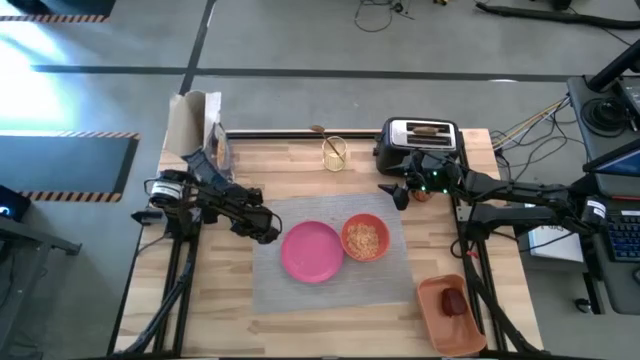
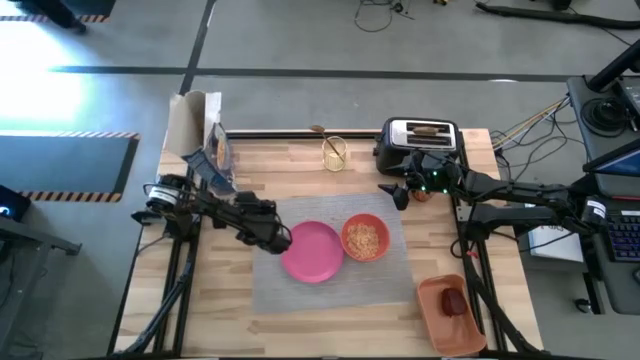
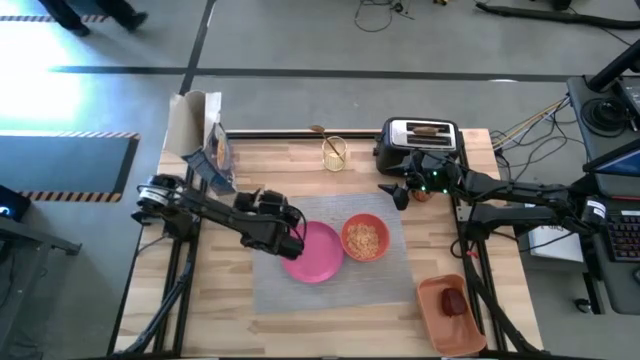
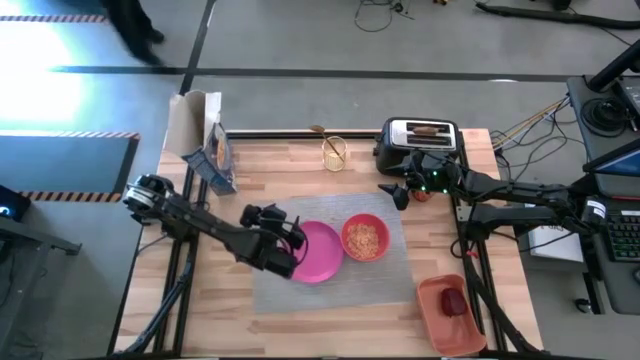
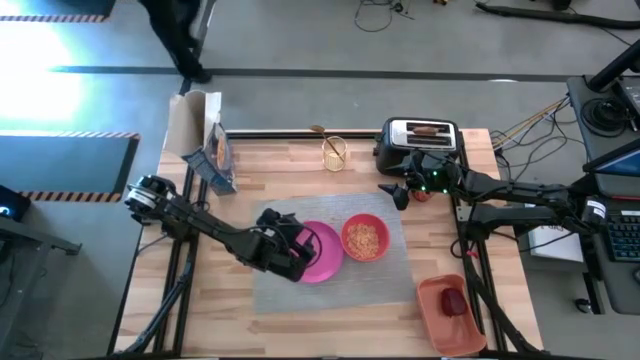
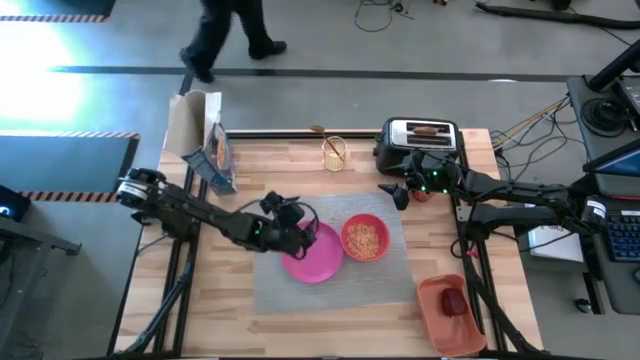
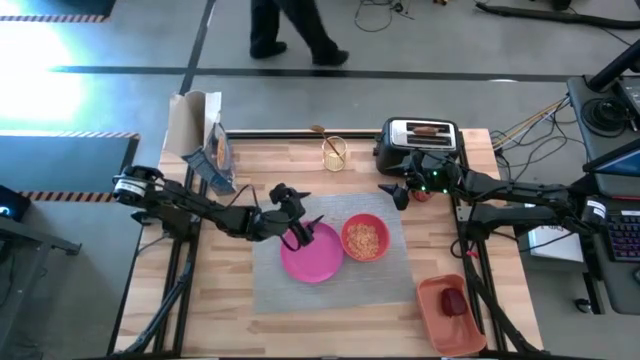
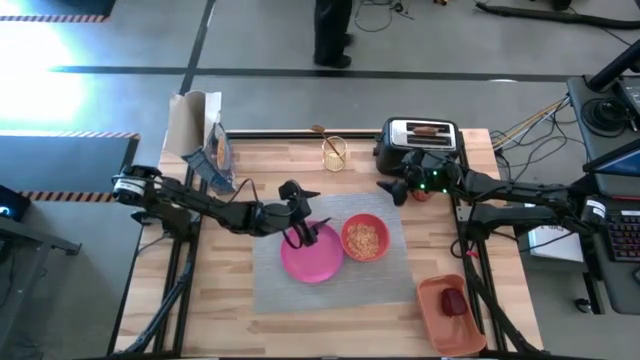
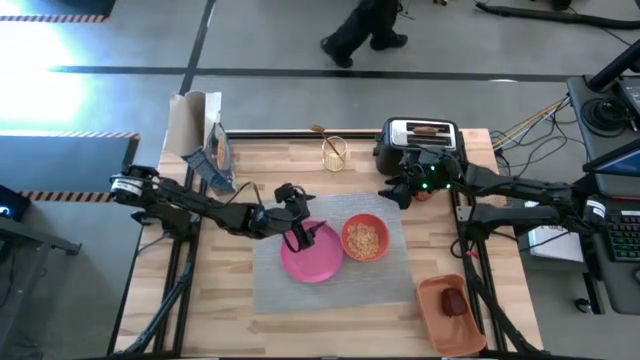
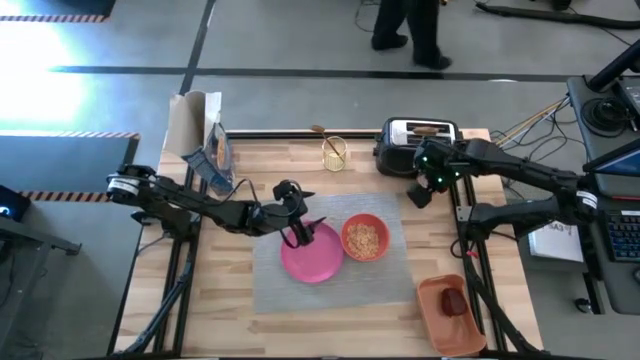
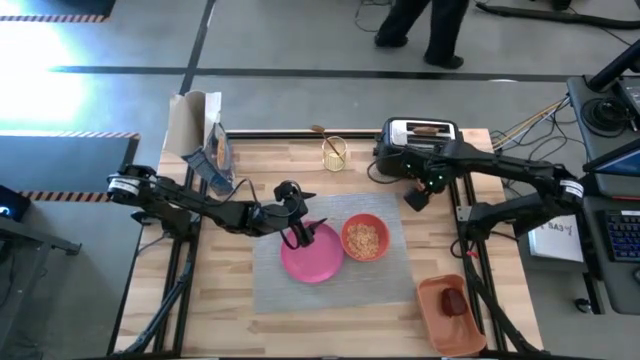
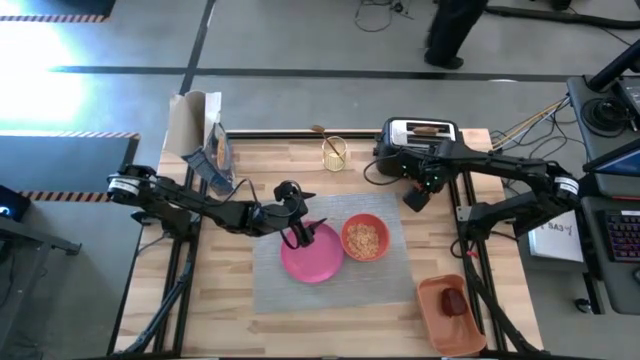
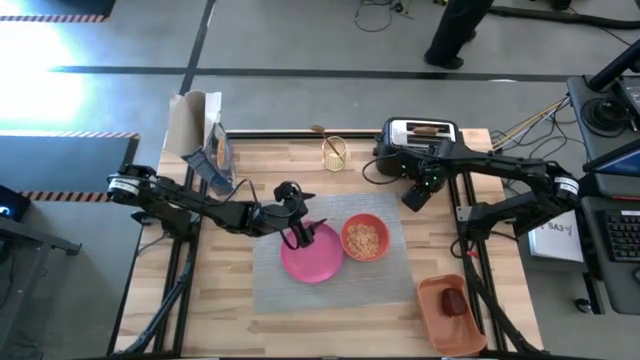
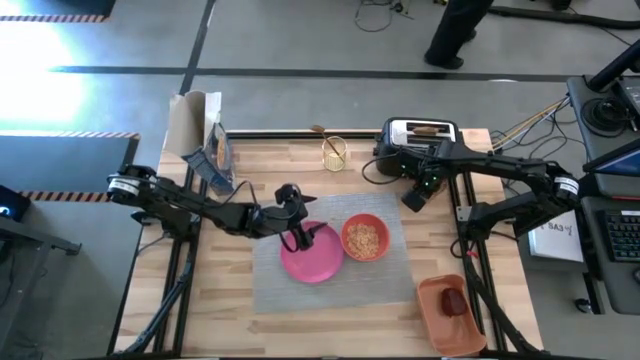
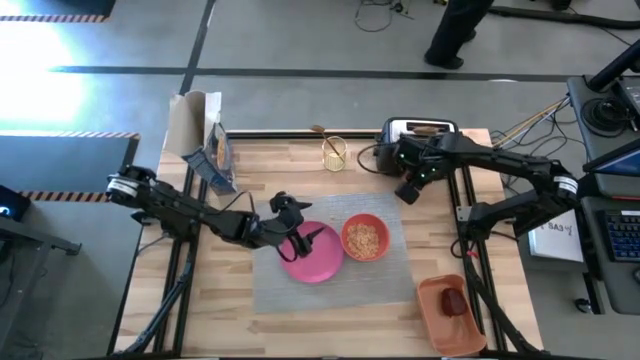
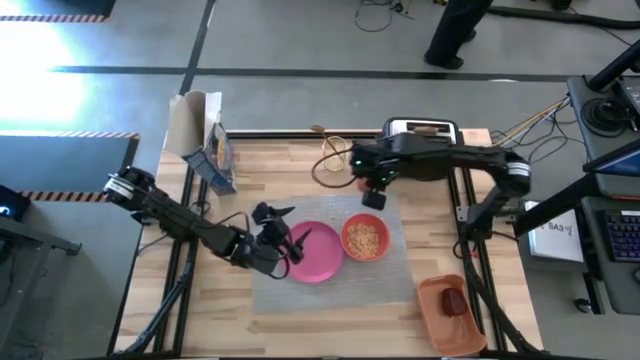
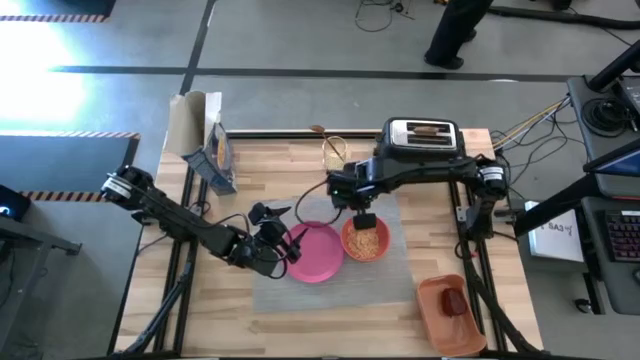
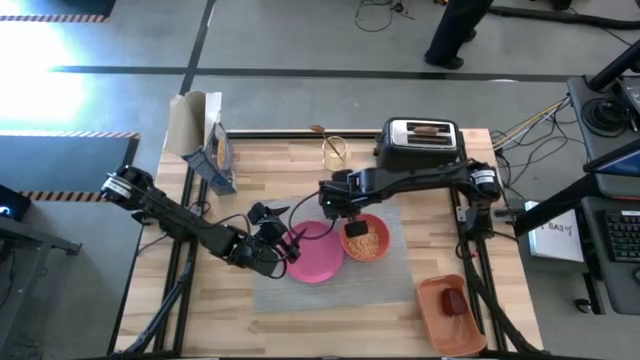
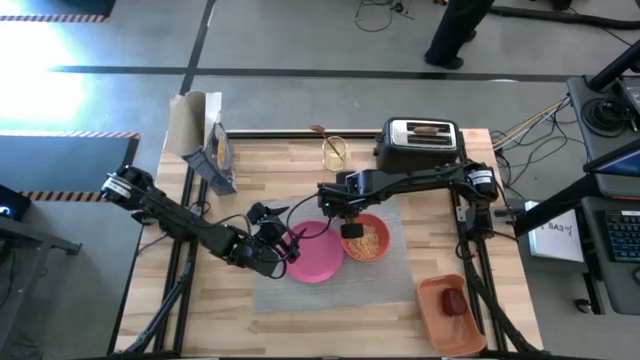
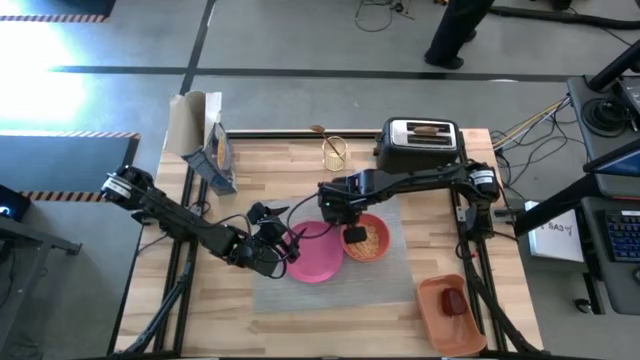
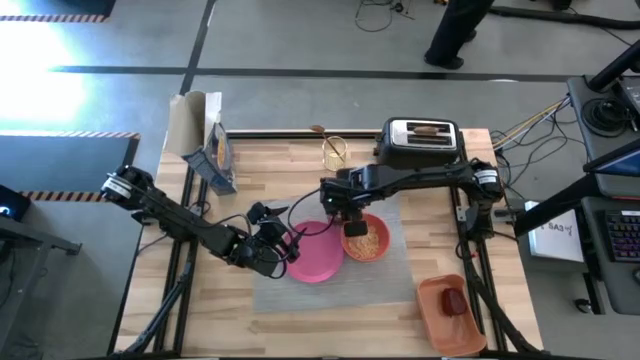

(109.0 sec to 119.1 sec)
Task: Arrange a breakfast setting
Put the orange cup on the gray table mat to the top left of the orange bowl

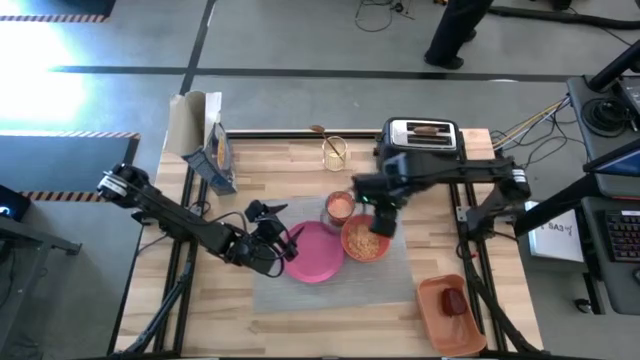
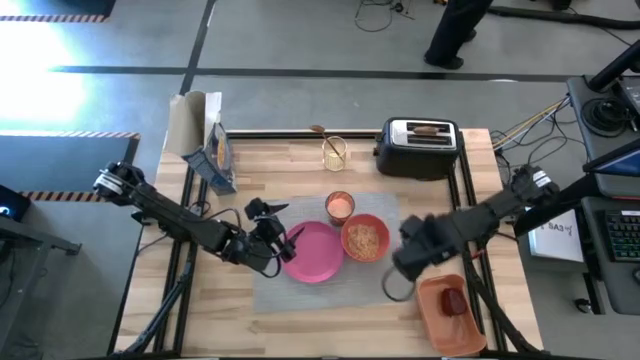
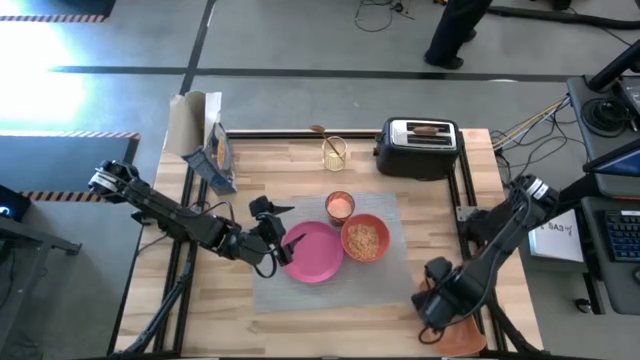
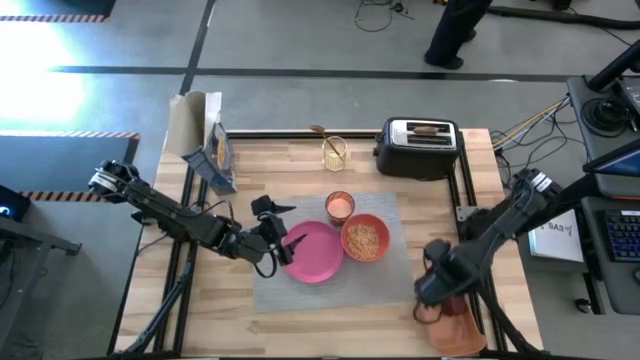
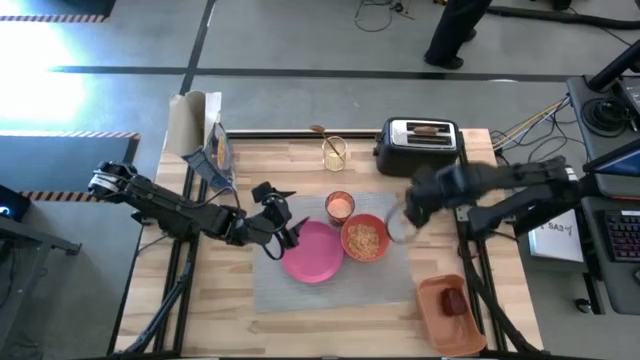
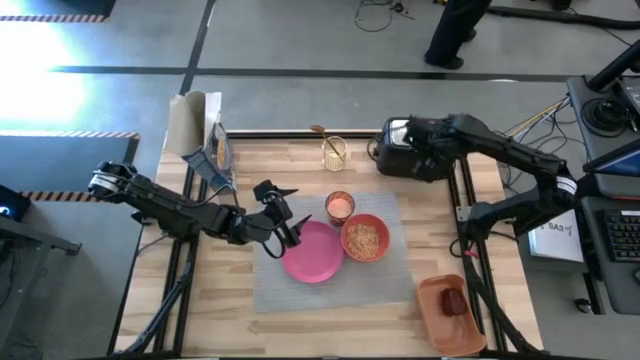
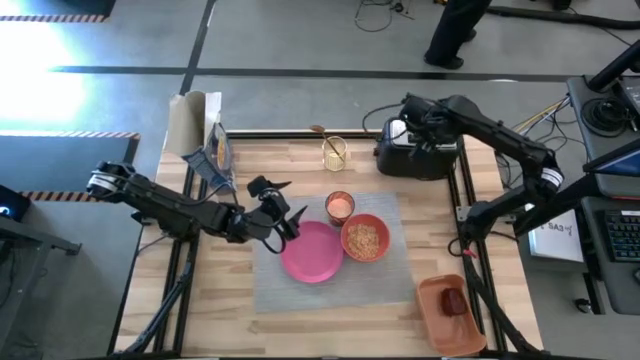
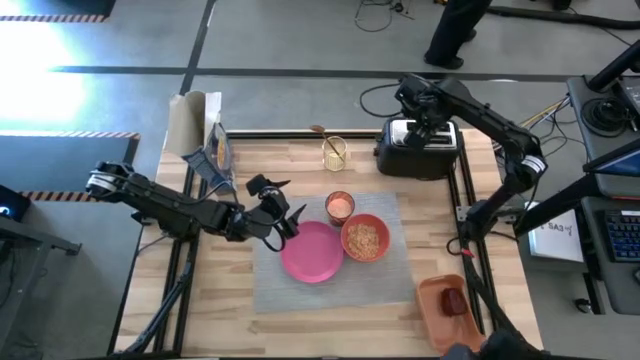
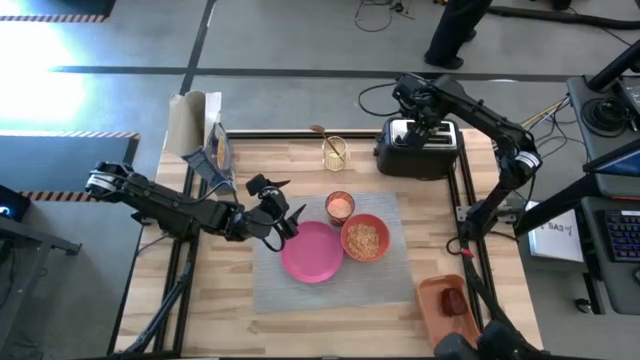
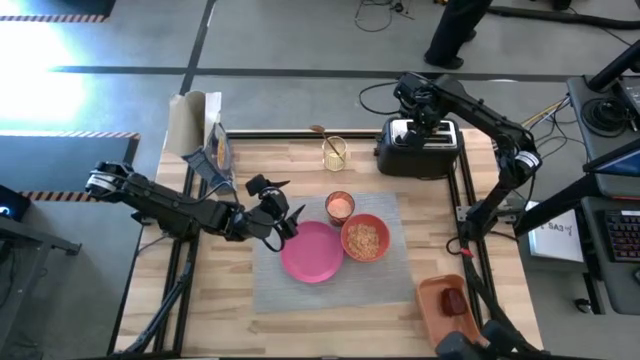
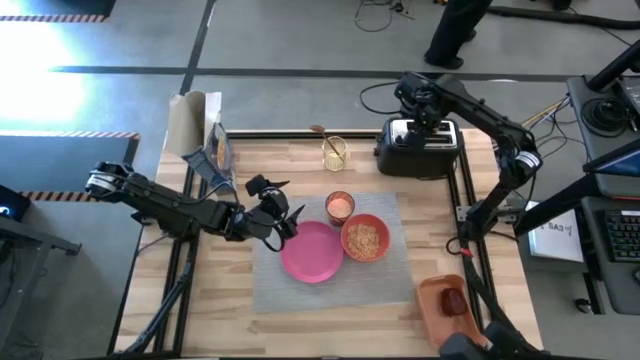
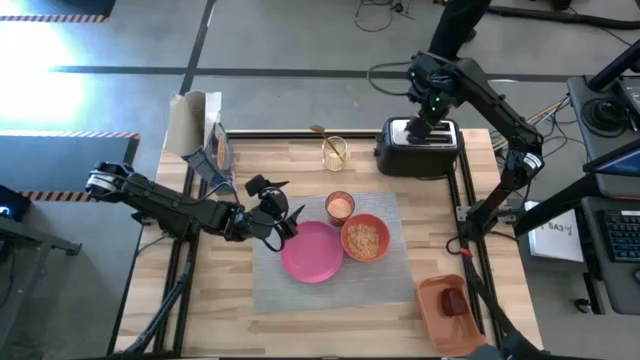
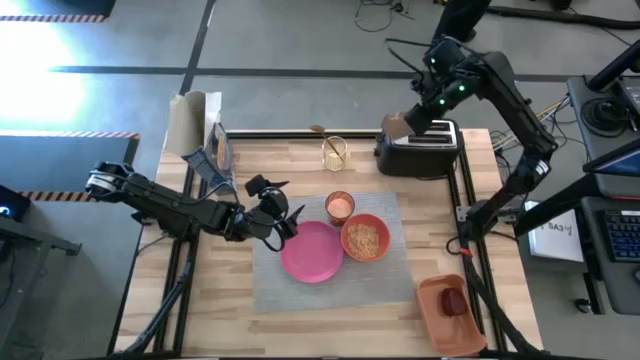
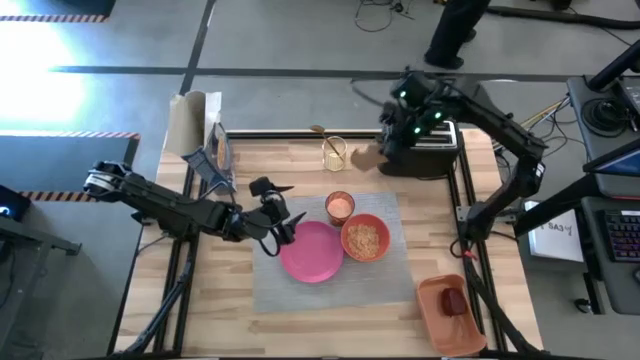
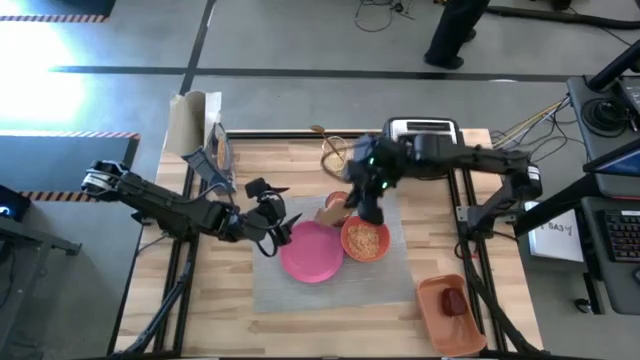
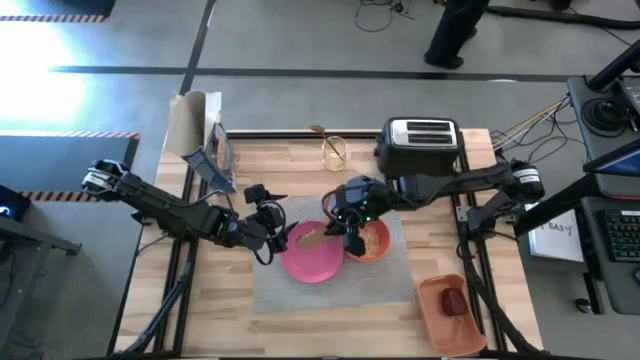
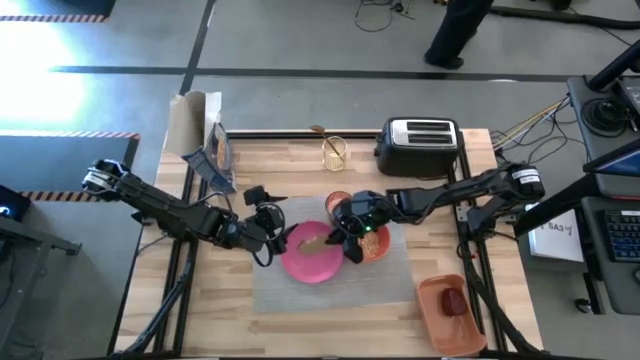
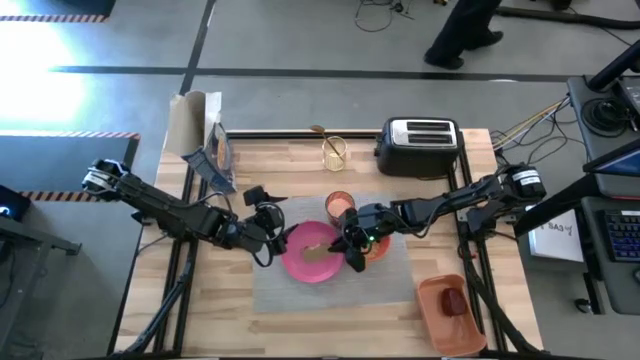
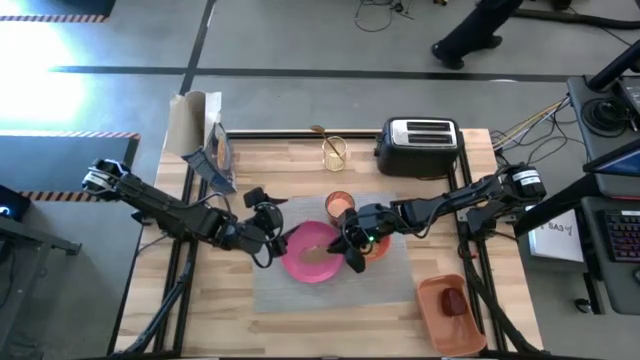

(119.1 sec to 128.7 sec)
Put the toasted bread on the pink plate on the gray table mat

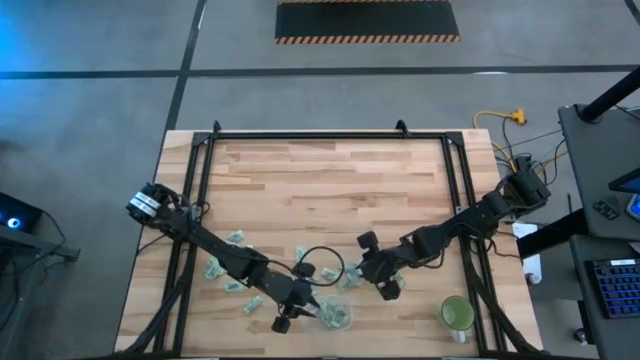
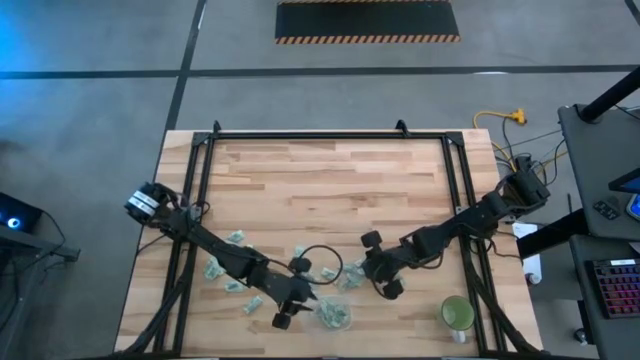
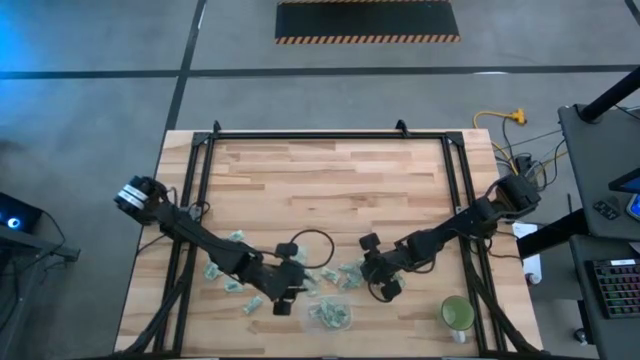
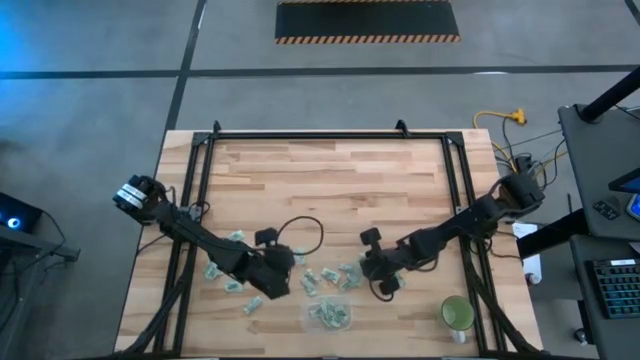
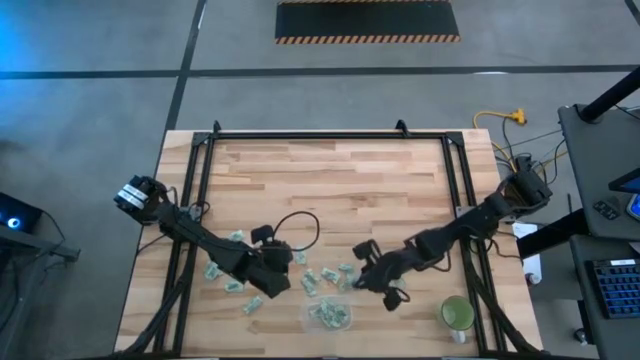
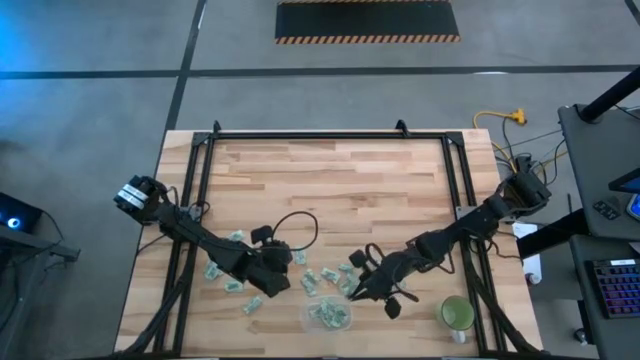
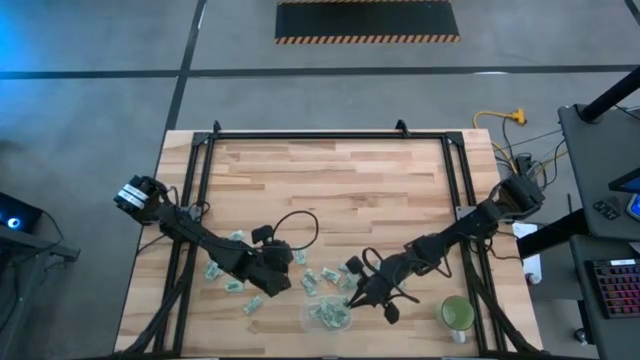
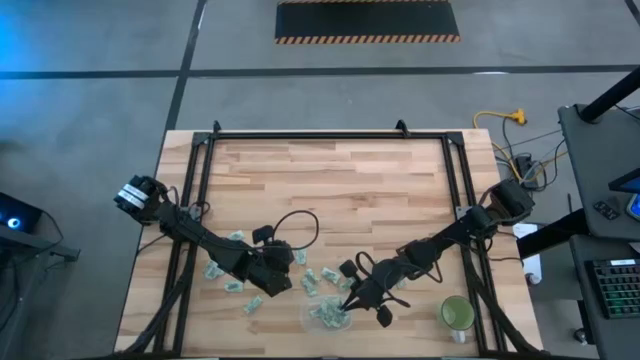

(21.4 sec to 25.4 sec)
Task: Pick and place Stevia / Truvia into bins
Put the stevia packet into the transparent container
